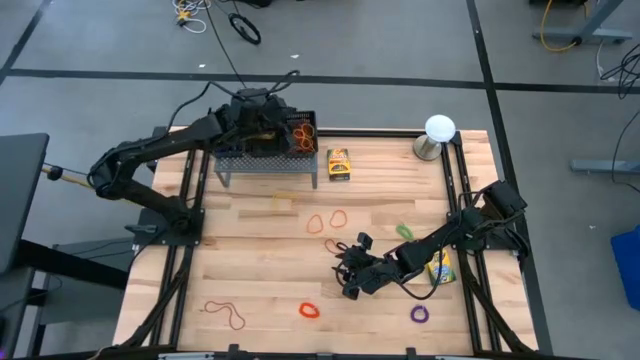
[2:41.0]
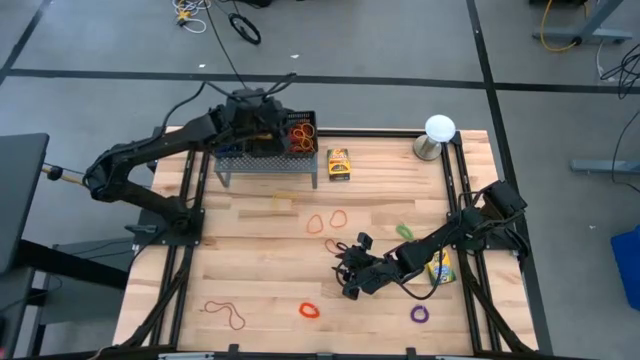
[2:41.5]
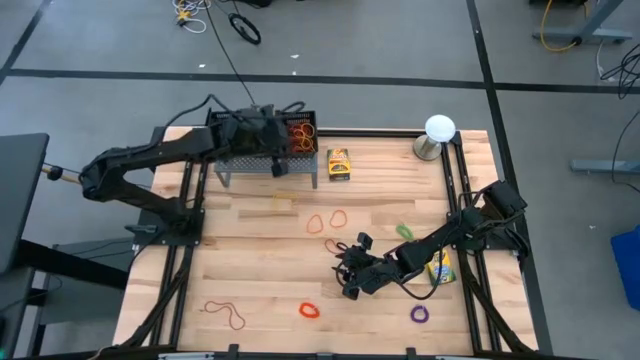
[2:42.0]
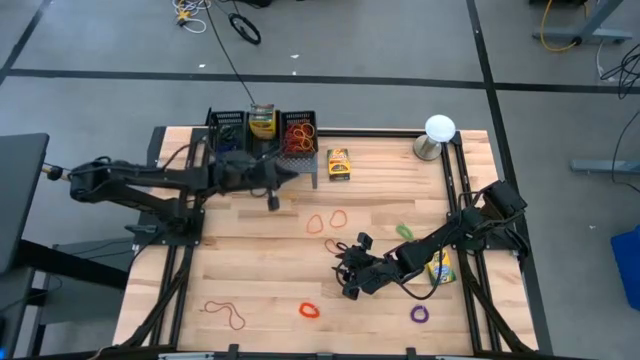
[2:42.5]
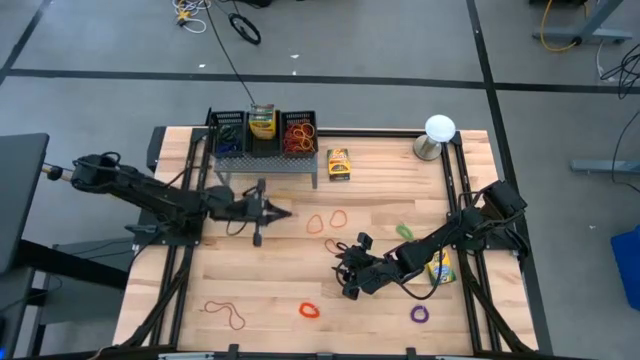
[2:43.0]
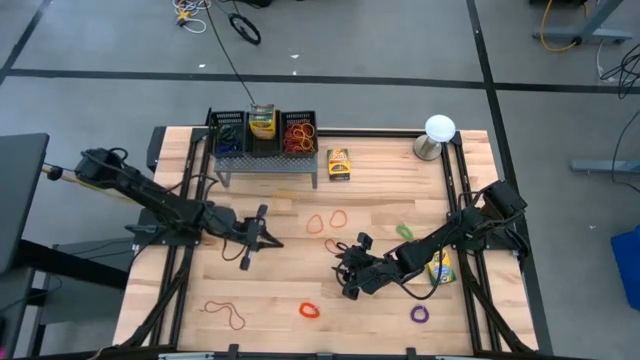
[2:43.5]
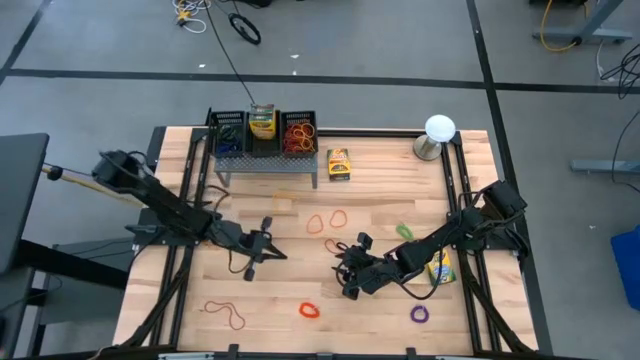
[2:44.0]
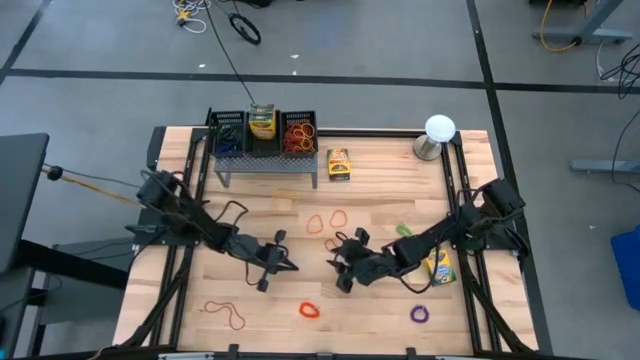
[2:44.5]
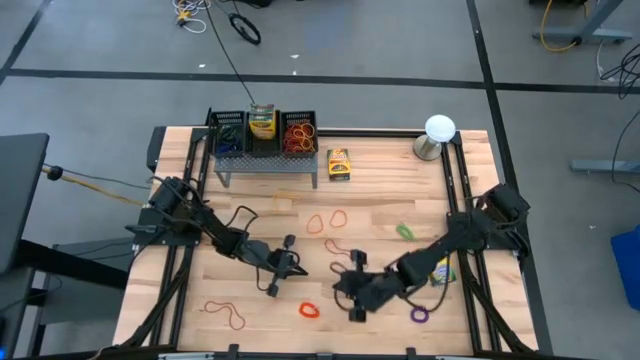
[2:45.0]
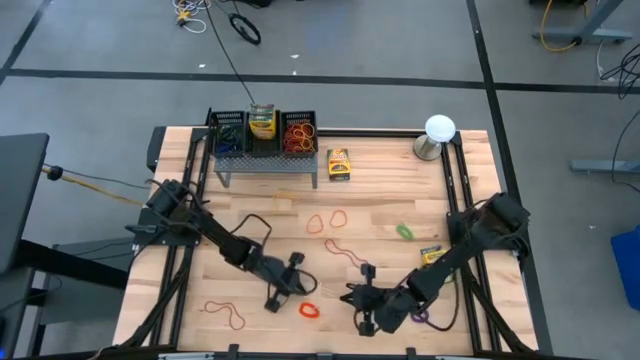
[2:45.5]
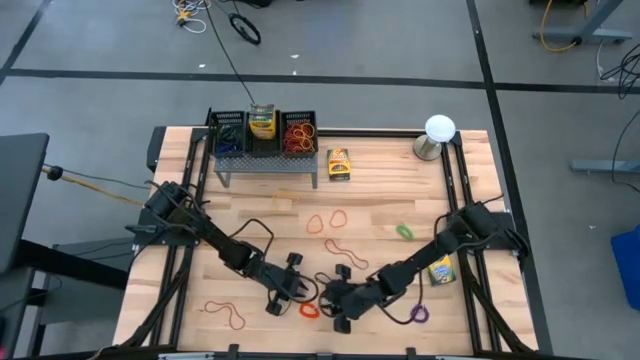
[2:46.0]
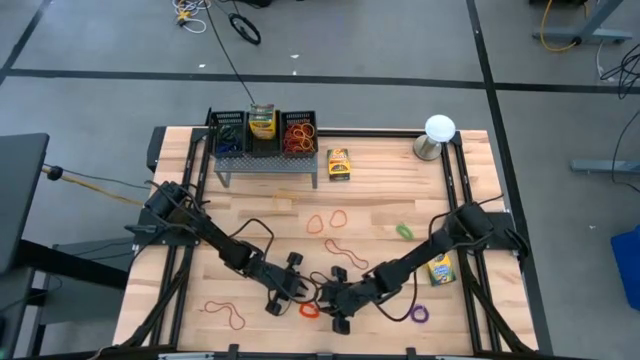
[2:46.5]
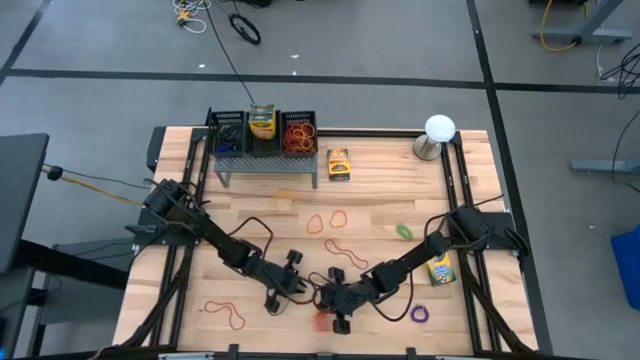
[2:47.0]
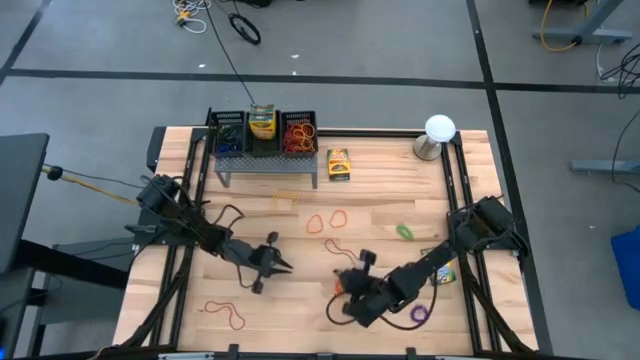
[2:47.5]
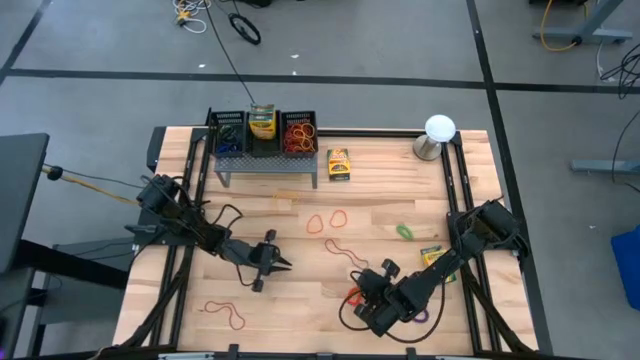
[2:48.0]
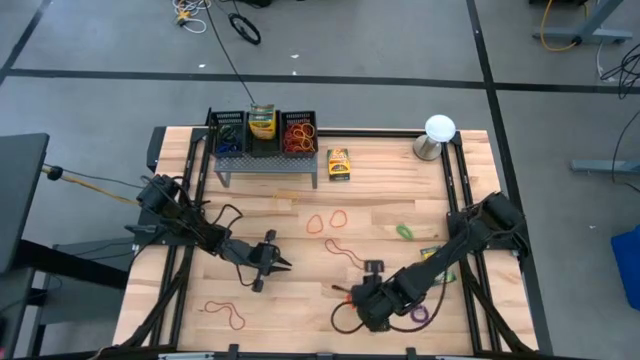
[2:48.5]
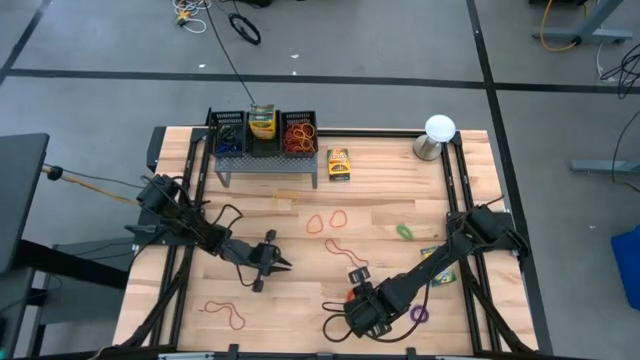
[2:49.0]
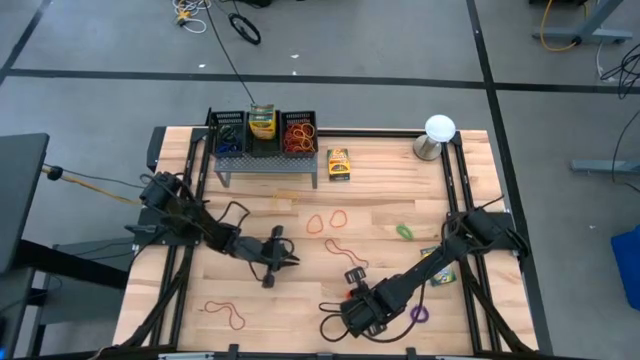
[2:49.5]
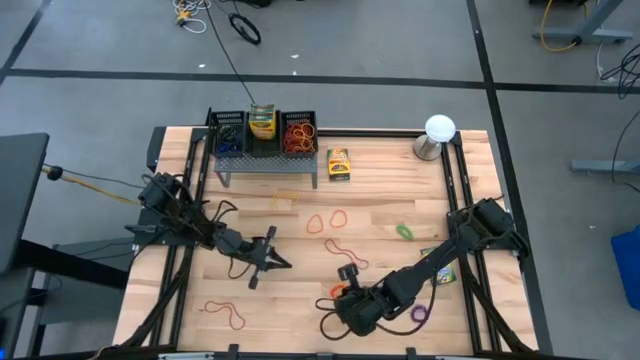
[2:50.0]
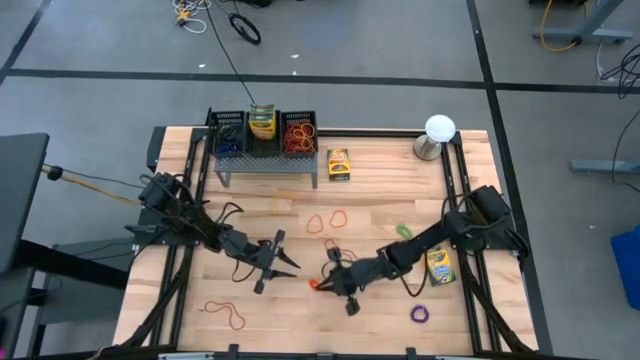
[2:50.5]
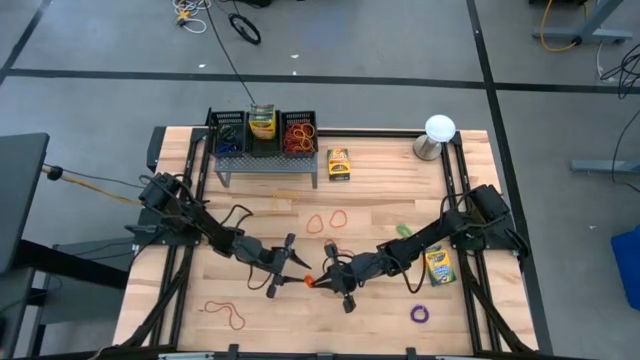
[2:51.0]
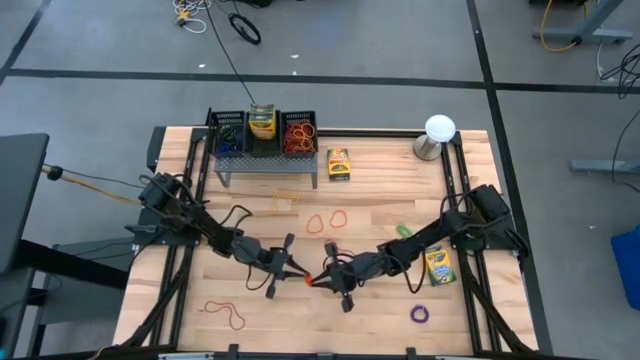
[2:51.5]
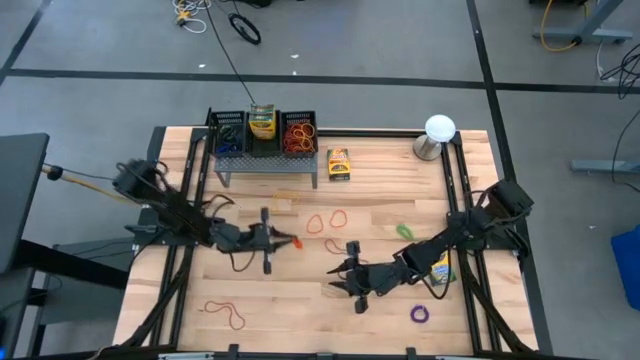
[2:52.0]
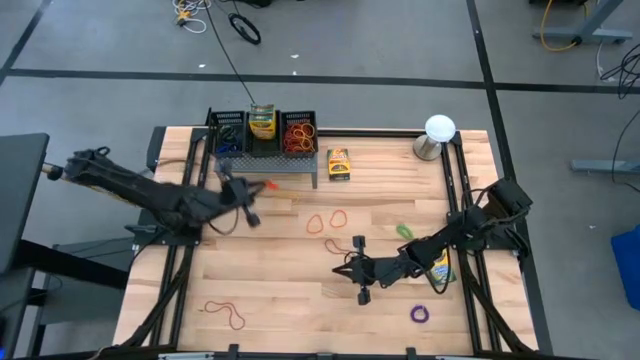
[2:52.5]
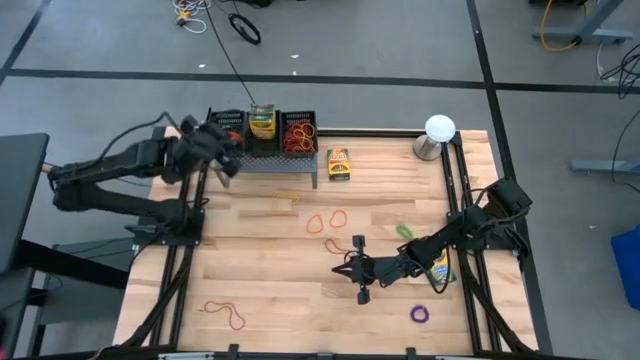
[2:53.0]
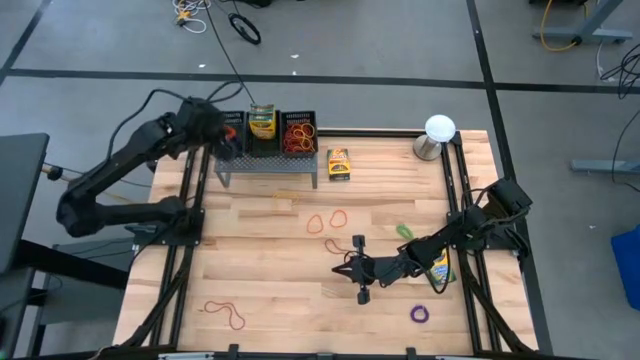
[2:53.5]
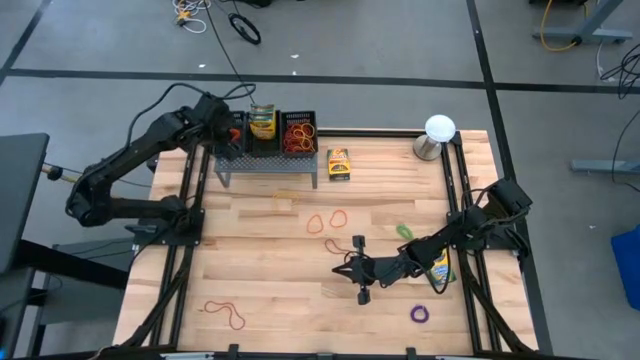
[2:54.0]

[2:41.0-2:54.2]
Task: Pick & Place Office Desk Supplies
Put the orange spiral keychain into the left black bin

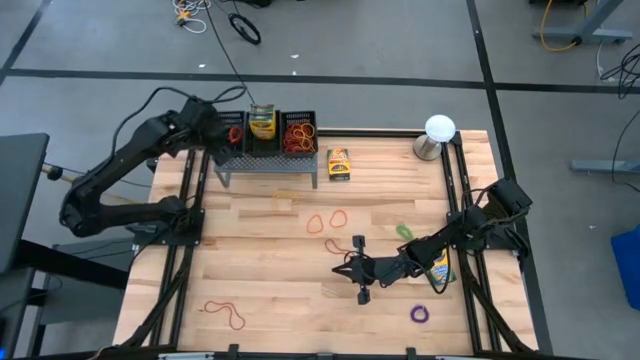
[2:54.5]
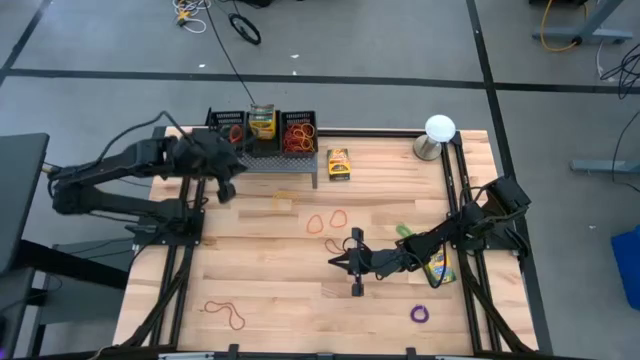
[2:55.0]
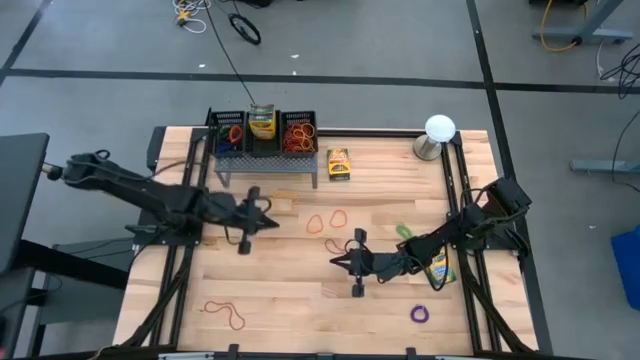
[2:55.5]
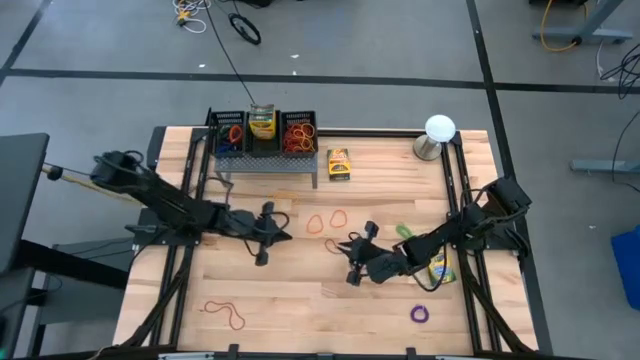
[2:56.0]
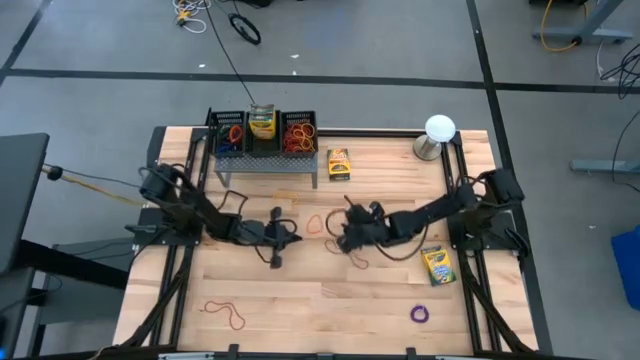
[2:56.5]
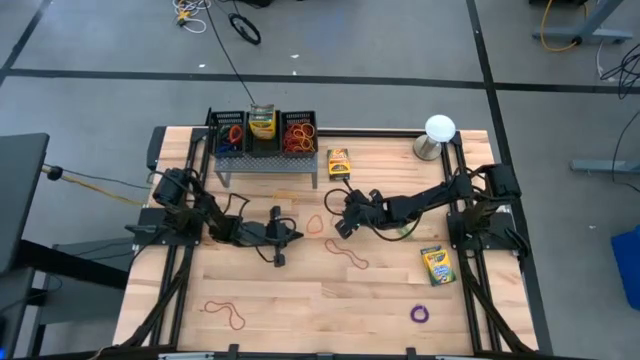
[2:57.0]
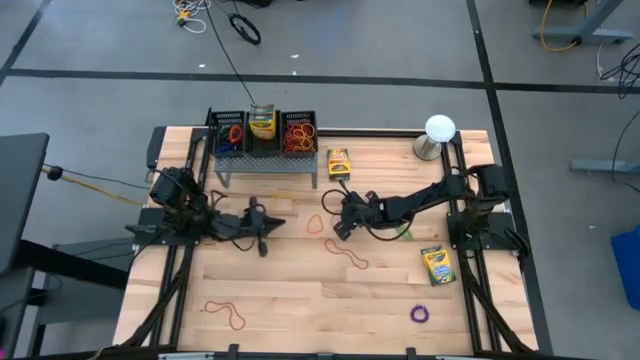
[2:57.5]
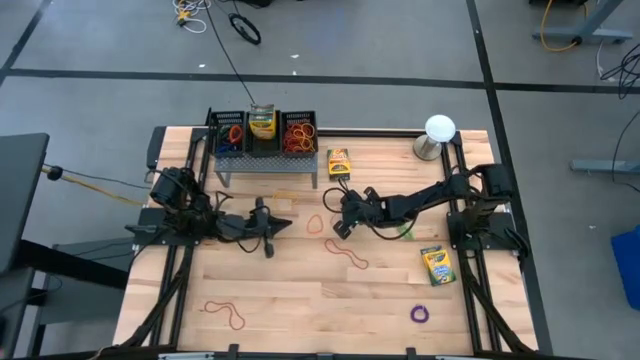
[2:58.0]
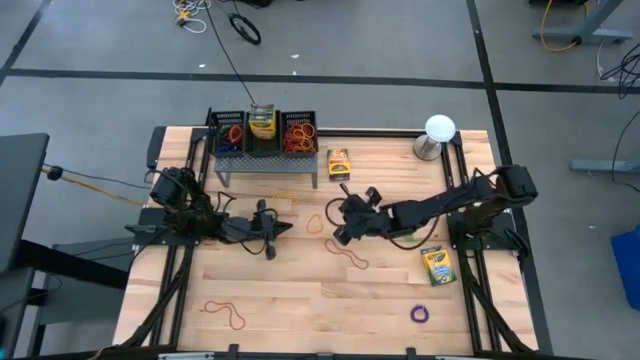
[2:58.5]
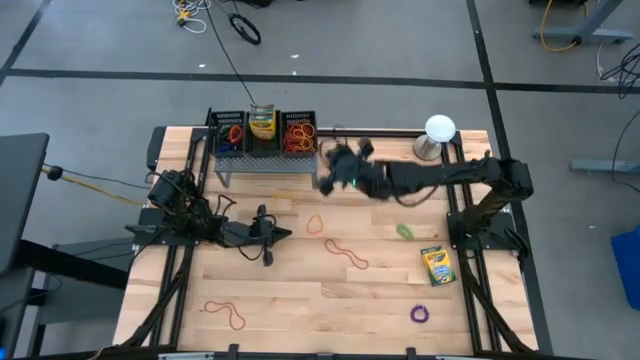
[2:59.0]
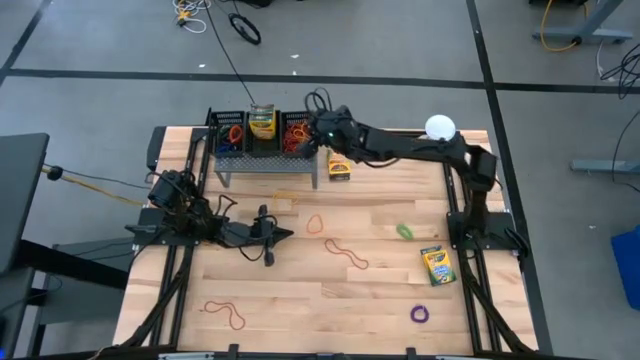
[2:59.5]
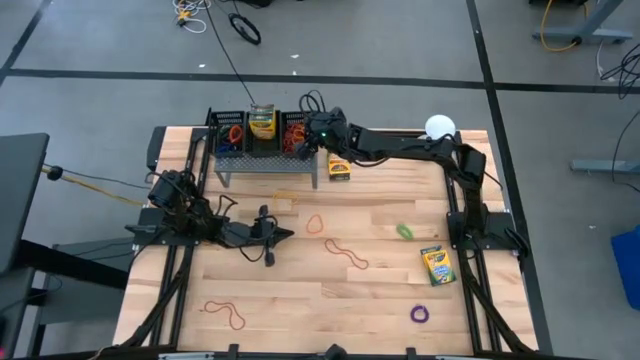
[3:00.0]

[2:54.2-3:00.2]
Put the right orange rubber band into the right black bin

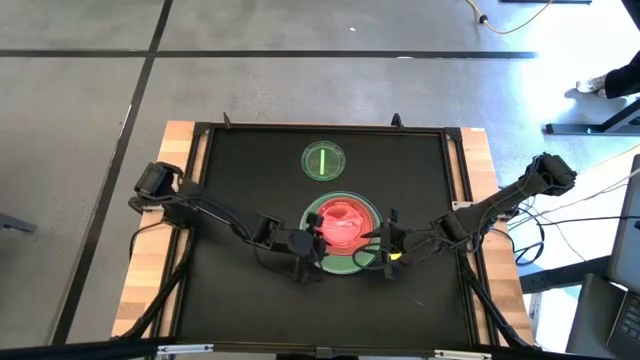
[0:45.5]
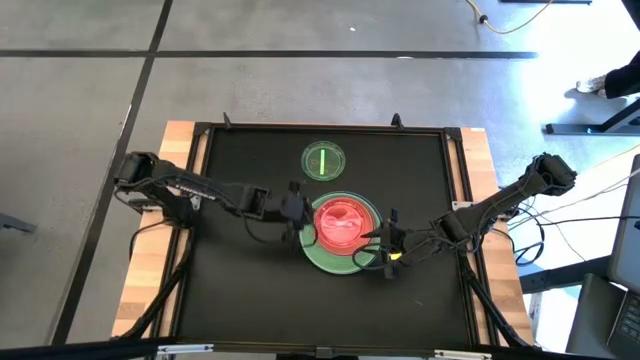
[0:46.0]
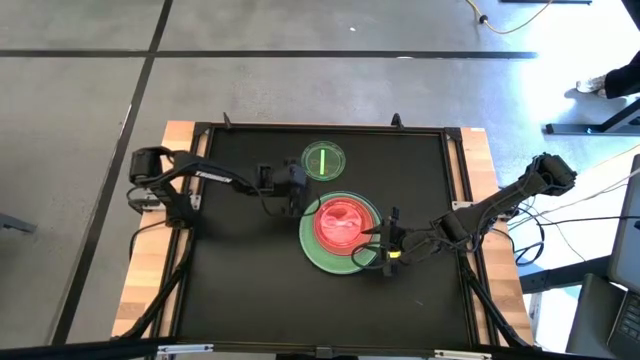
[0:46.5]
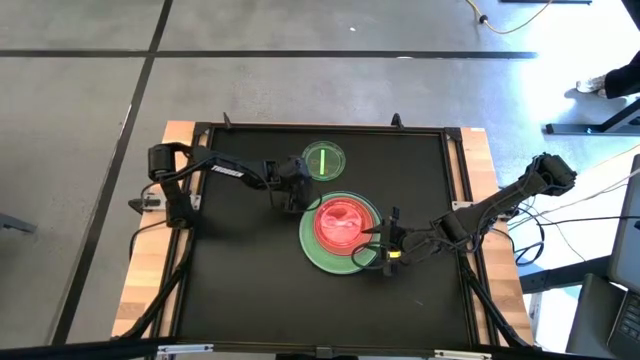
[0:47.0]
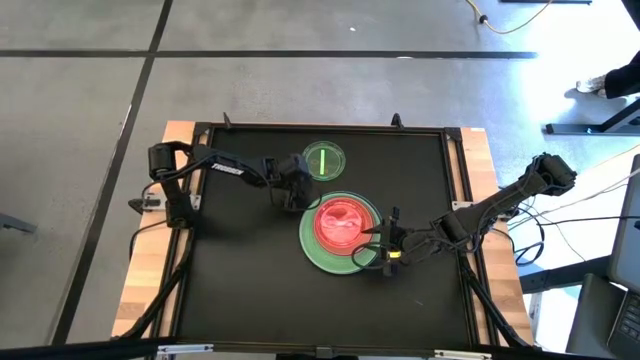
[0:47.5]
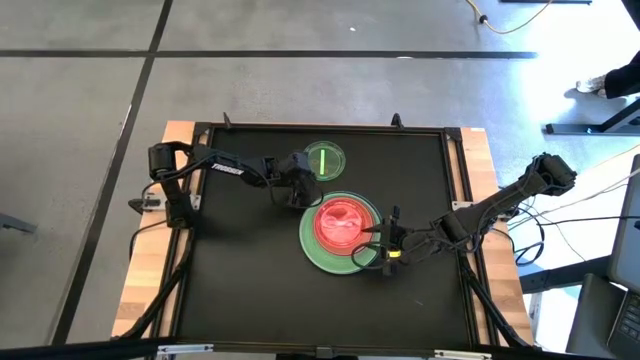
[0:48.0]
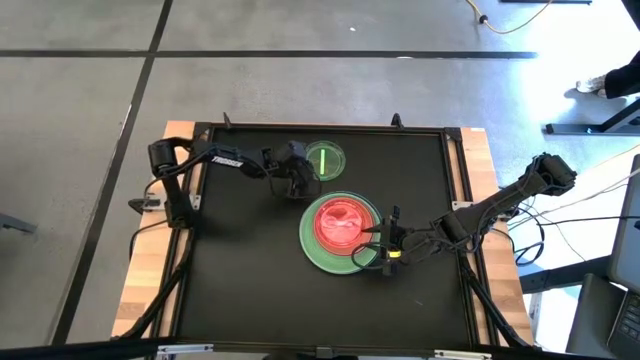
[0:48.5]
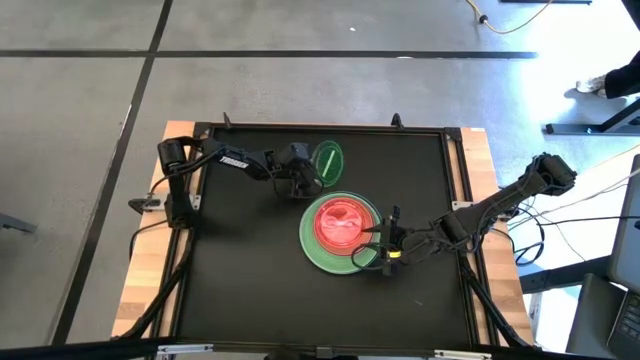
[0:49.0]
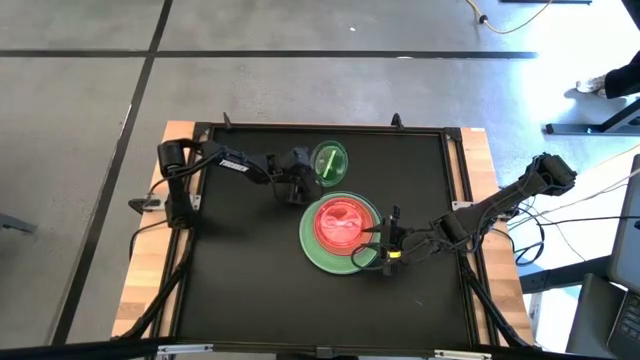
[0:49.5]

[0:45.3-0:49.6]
Task: Stack plastic plates
Stack the transparent green plate on the transparent pink plate
